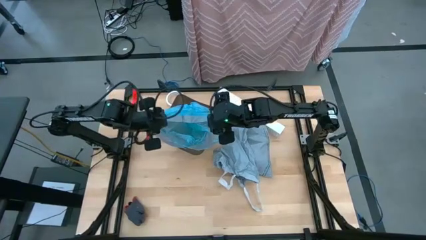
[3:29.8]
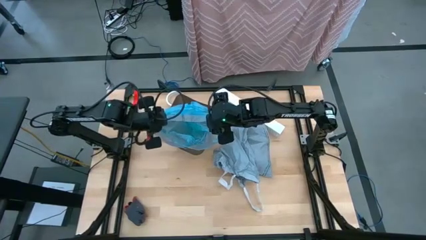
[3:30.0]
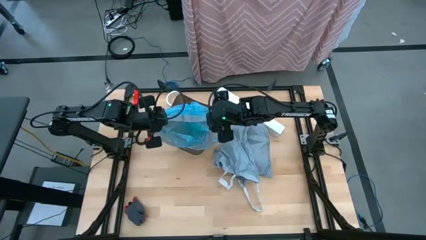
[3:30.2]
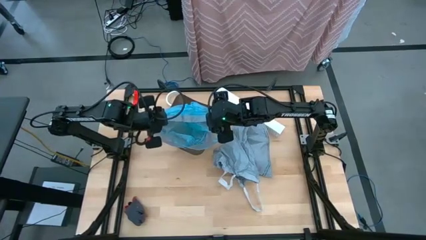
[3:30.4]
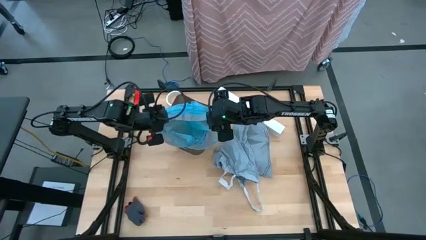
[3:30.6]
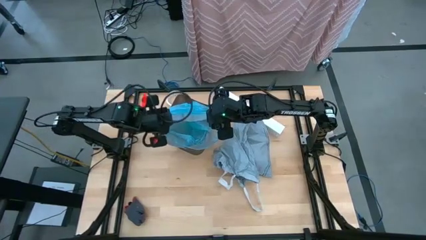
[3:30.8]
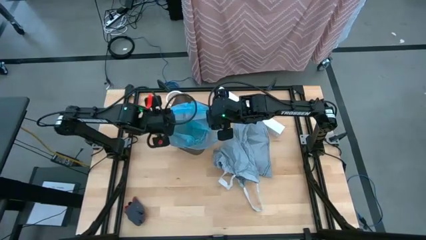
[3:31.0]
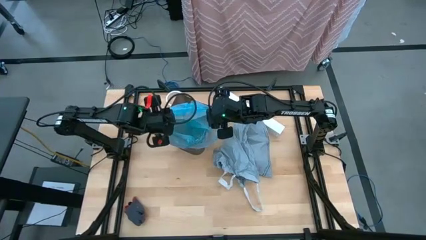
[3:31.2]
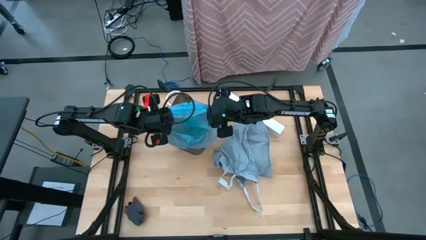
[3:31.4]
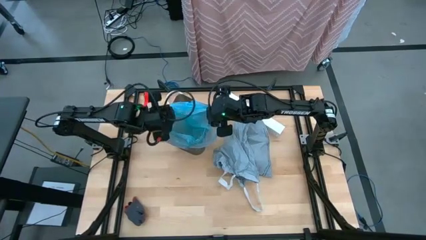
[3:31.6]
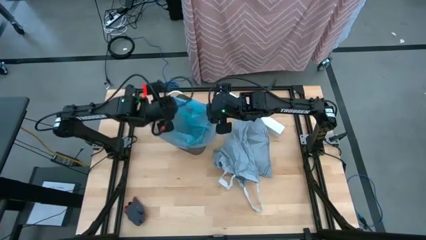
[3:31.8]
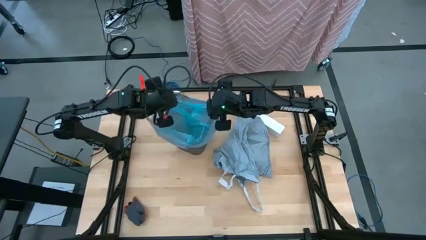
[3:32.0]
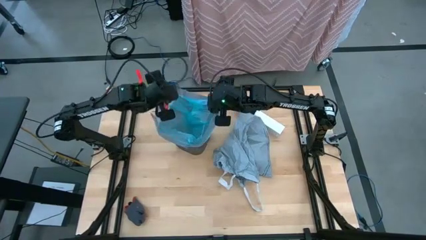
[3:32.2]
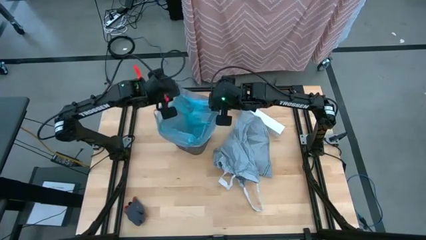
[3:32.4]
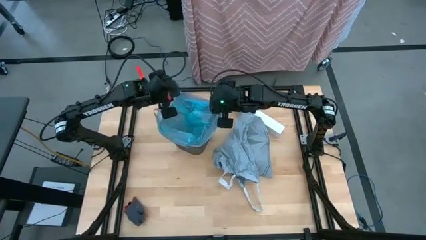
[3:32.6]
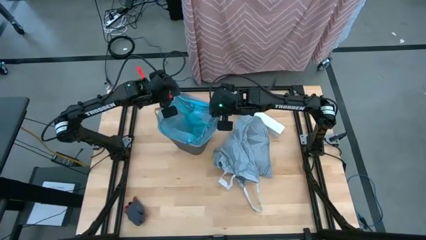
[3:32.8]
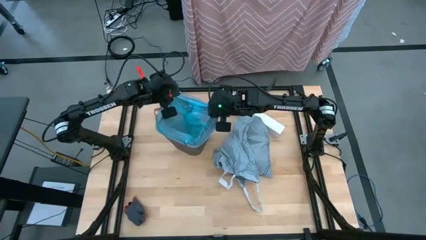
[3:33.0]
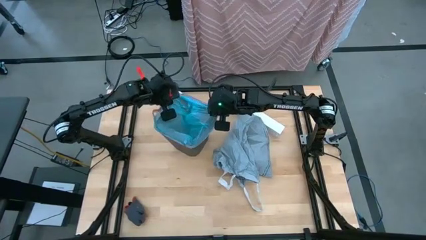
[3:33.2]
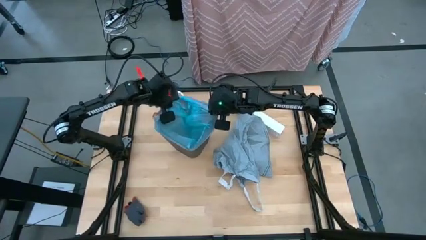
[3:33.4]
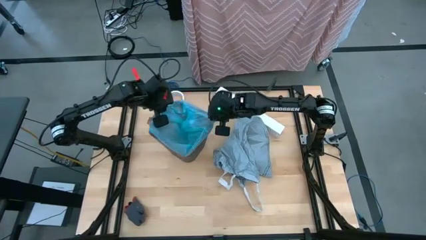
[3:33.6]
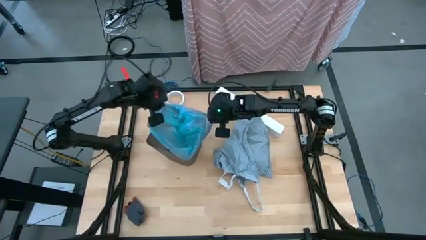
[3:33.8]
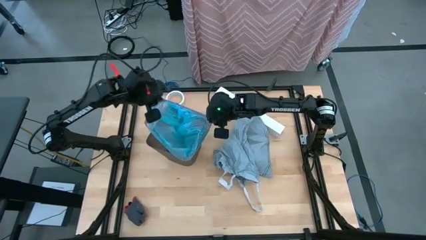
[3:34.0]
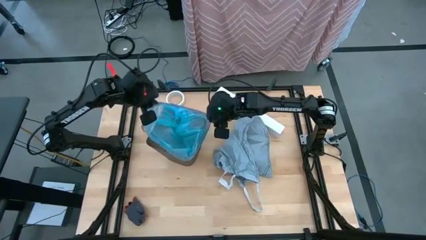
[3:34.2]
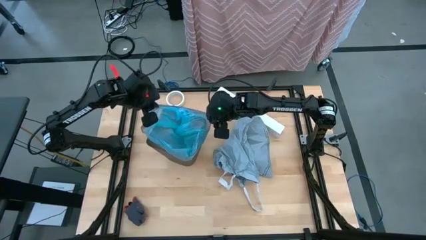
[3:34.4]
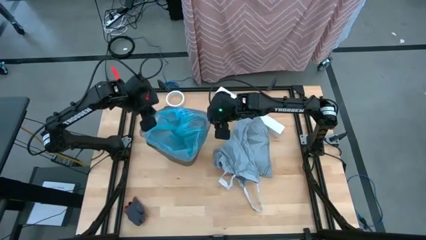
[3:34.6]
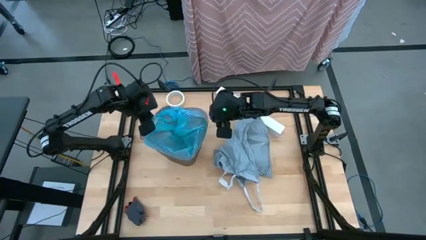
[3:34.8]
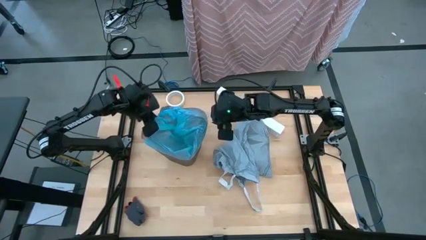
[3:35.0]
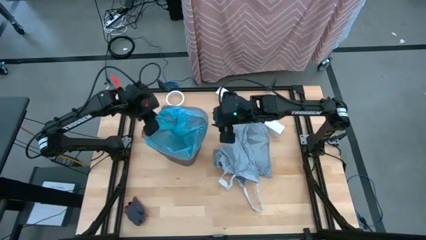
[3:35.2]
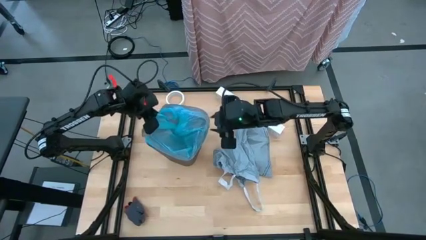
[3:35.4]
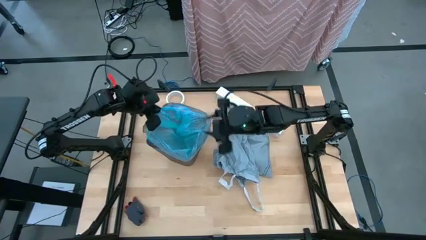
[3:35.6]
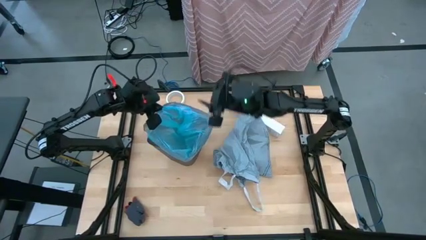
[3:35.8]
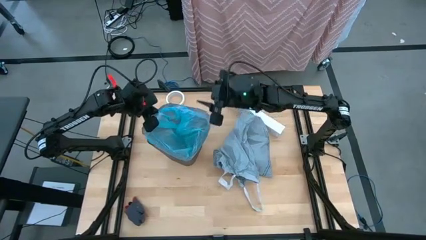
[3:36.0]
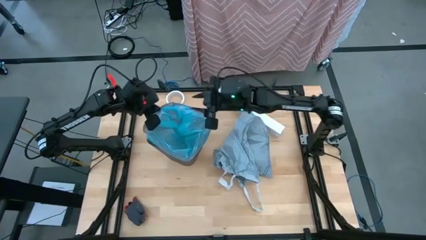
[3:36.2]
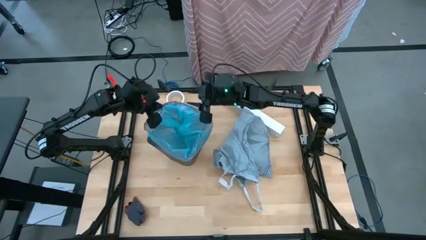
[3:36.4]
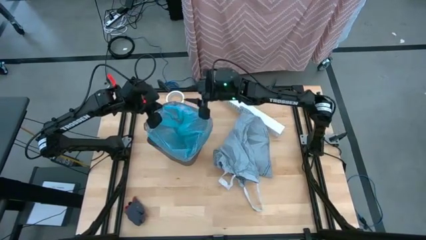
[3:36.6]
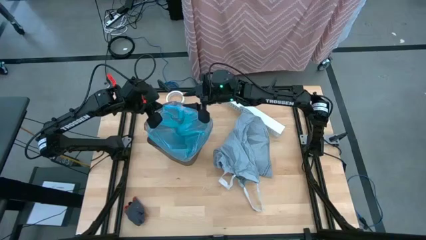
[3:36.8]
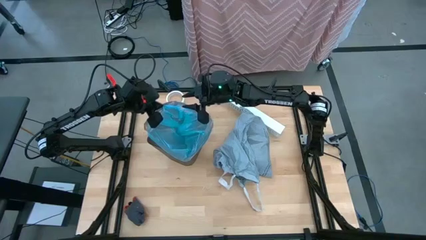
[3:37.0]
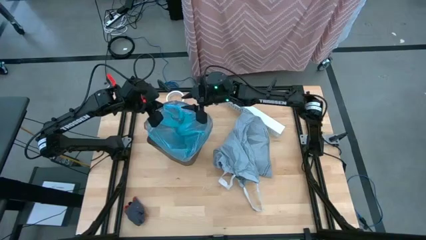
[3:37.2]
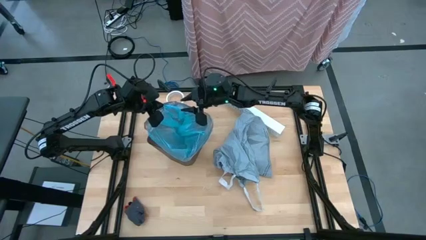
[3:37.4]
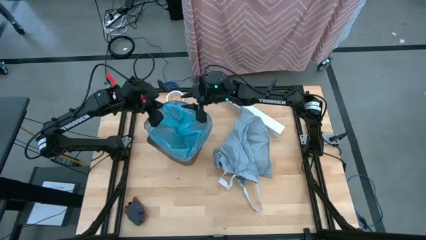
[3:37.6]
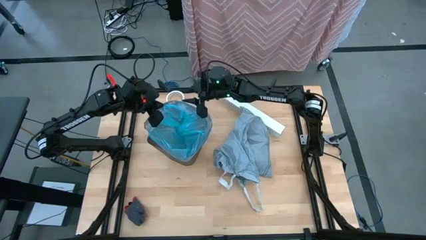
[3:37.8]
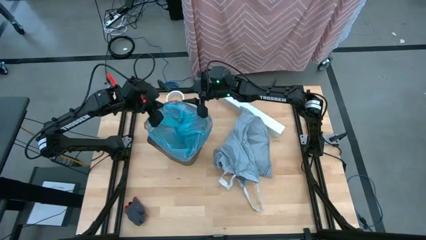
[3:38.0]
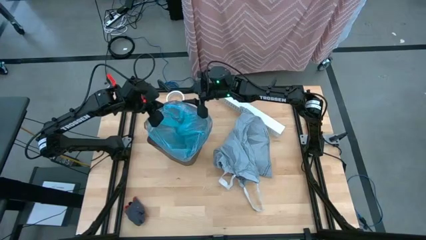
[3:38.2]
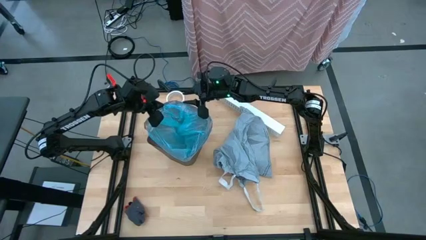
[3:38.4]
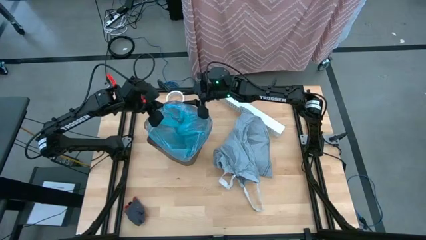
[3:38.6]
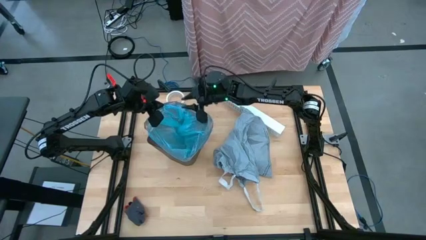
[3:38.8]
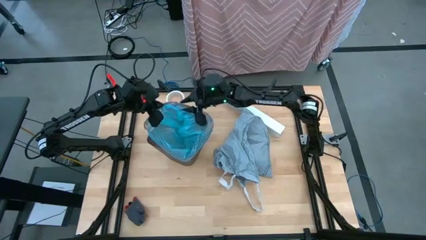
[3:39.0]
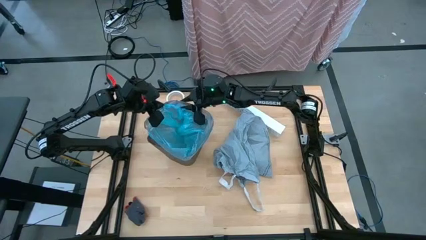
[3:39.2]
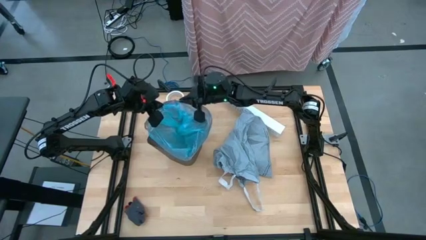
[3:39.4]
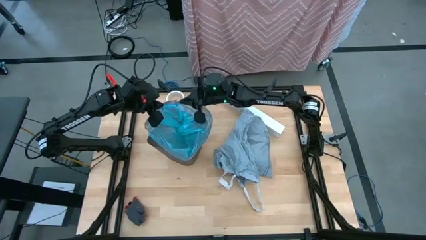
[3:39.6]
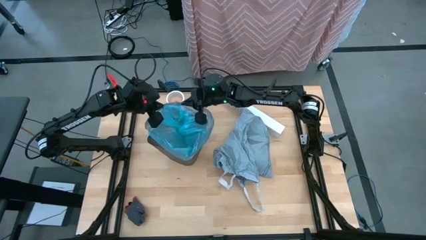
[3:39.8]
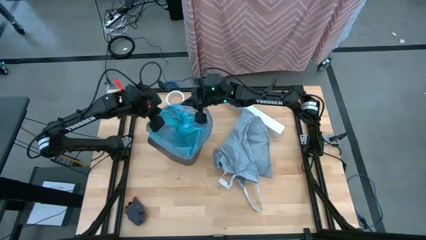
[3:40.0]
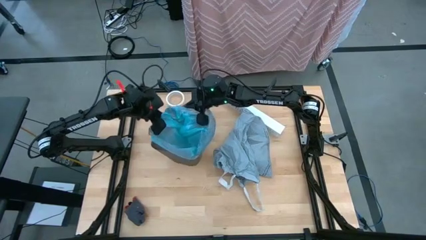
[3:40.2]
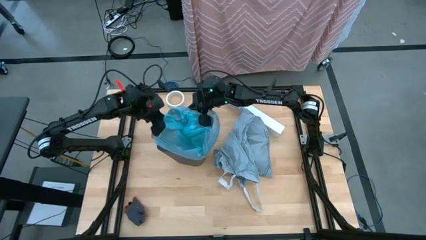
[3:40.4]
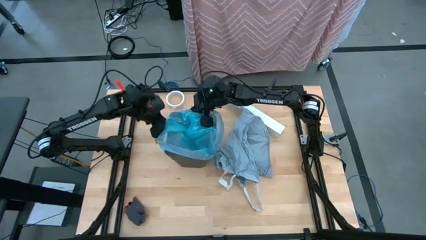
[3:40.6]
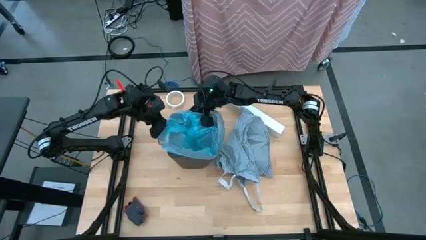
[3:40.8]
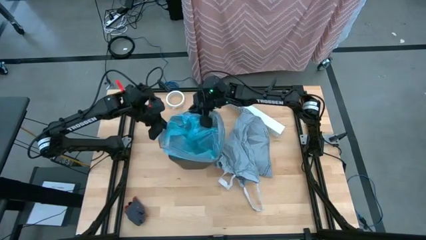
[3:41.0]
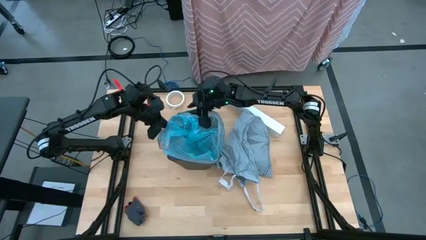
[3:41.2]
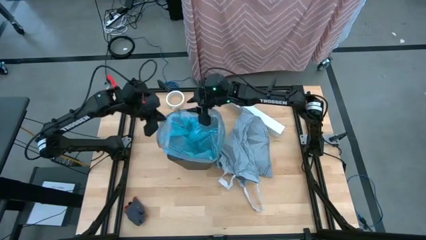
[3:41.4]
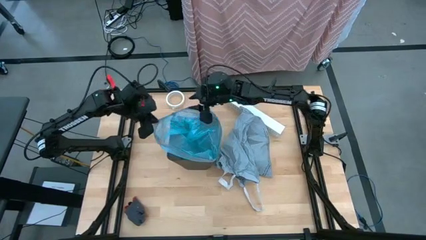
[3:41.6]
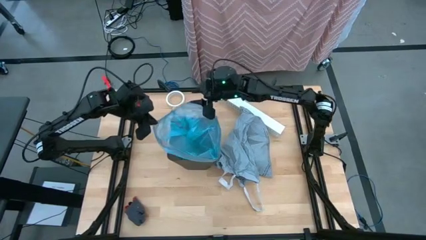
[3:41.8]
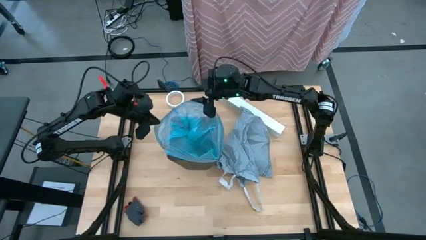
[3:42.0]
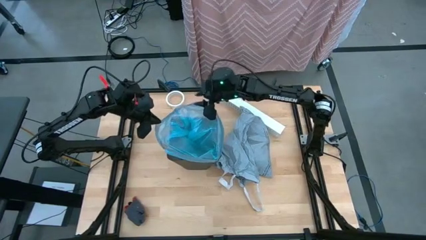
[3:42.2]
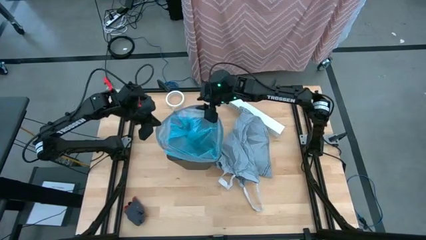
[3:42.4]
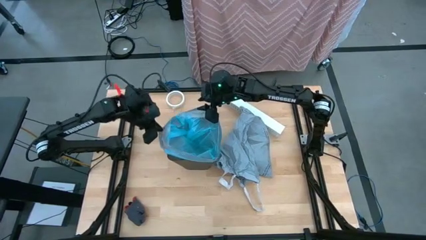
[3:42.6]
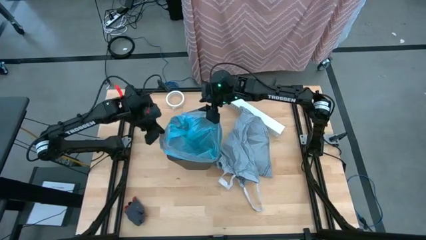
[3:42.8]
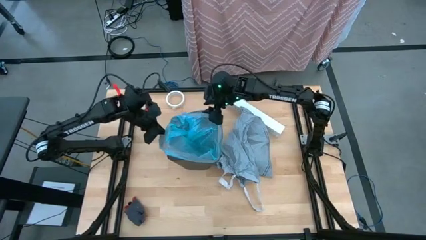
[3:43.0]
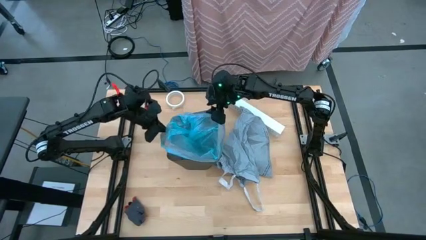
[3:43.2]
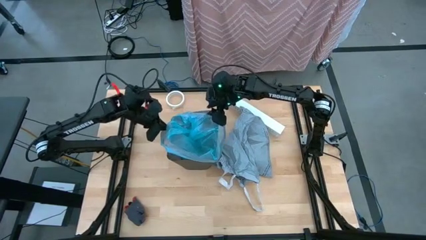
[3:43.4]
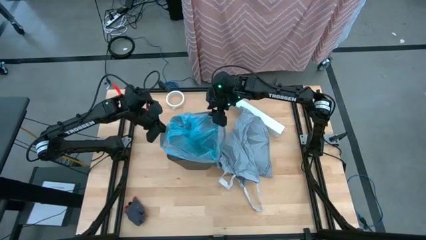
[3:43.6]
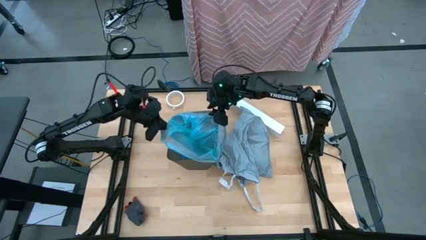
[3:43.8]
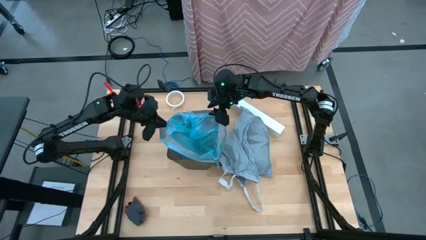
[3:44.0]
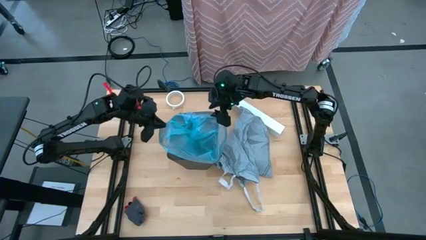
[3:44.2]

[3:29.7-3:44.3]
Task: place trash/remove bag and relplace
Insert a new trash bag into the trash bin

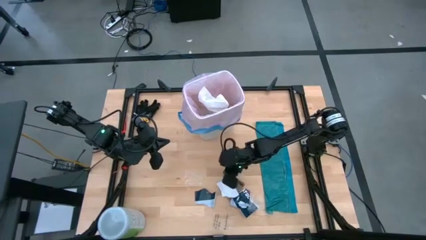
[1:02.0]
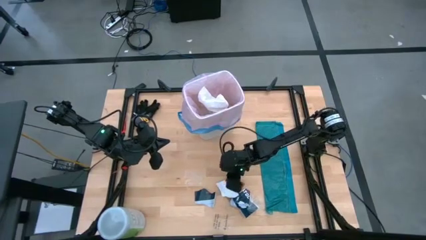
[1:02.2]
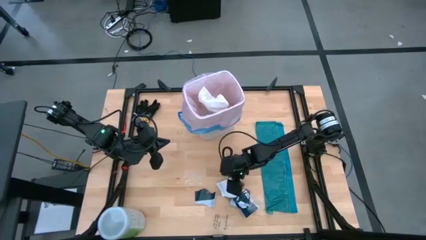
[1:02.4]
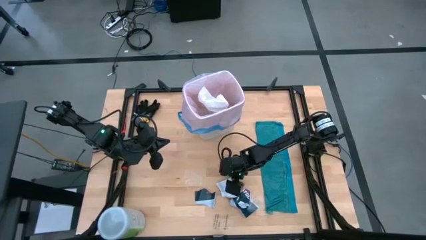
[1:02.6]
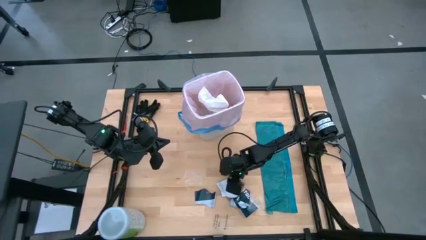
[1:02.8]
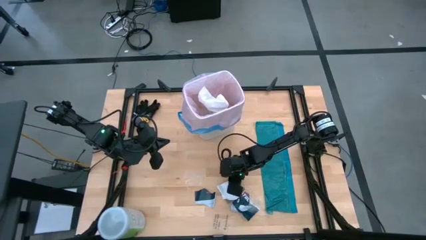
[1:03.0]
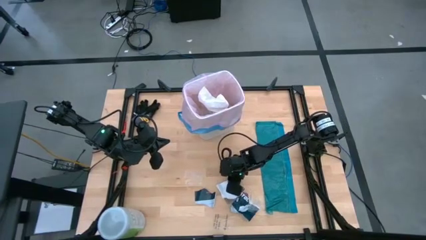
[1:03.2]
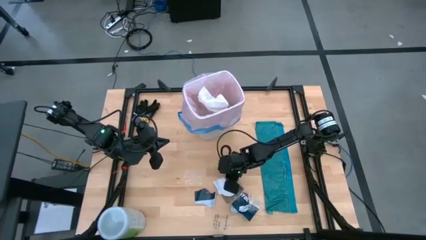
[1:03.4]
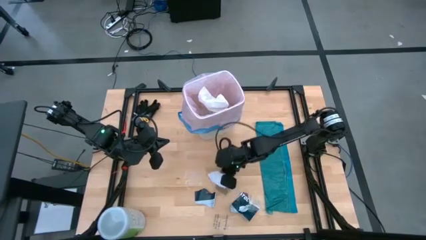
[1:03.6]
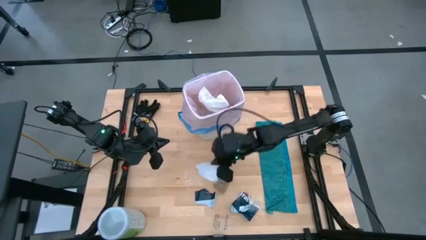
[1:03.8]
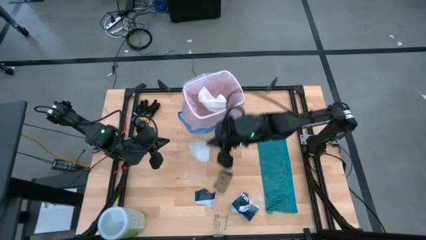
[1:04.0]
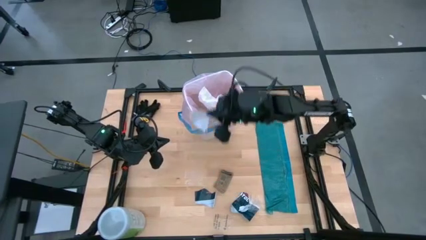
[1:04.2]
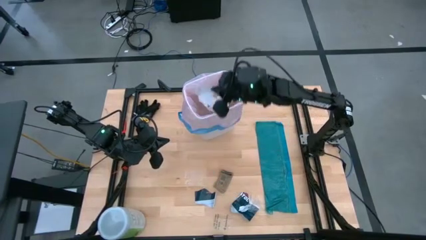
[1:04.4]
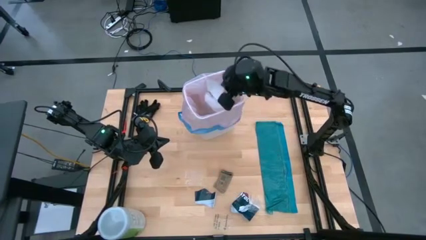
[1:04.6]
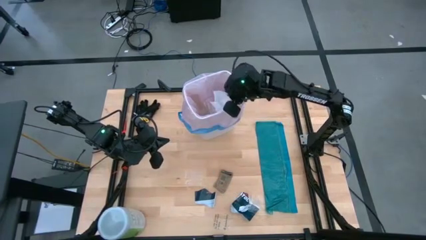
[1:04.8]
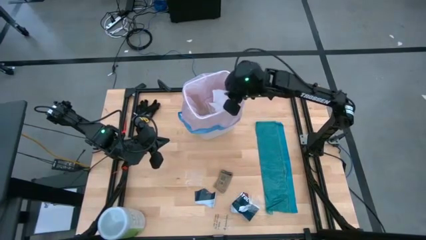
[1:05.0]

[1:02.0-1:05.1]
Task: place trash/remove bag and relplace
Put the white paper into the white trash bin
